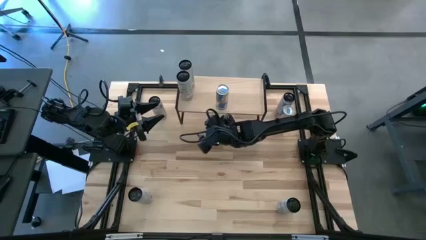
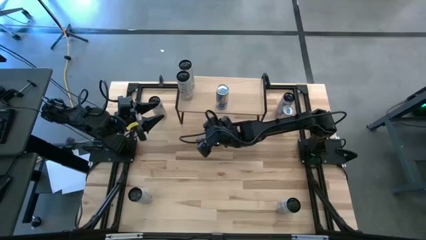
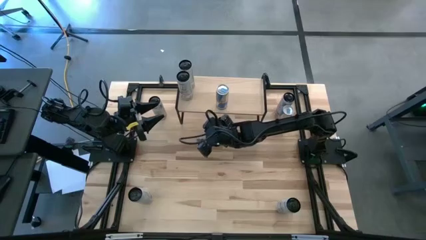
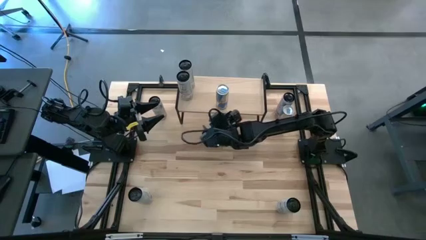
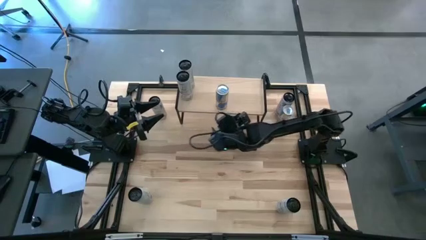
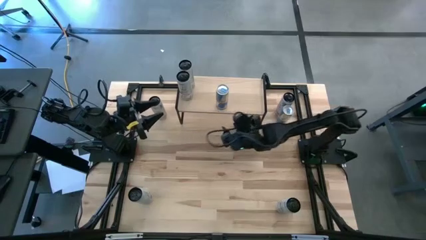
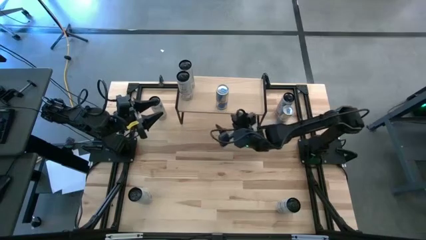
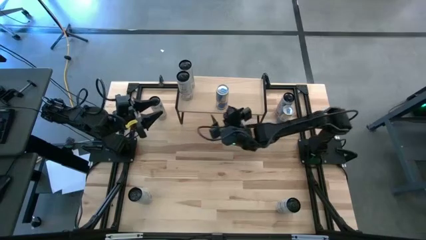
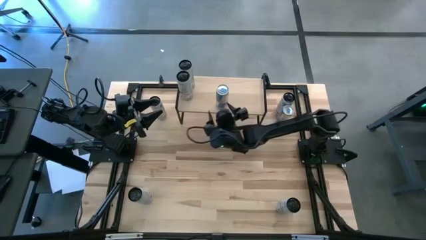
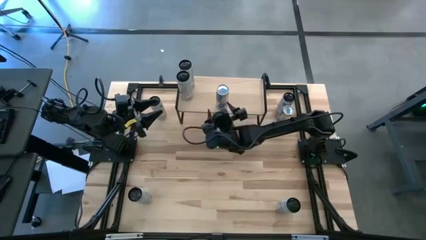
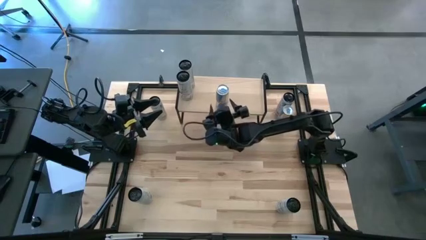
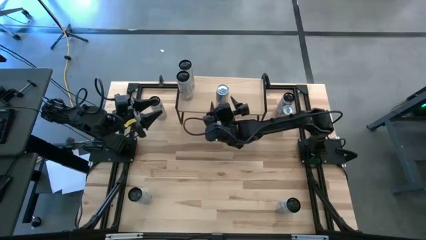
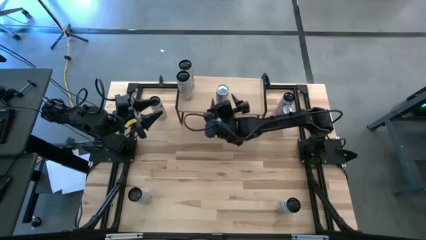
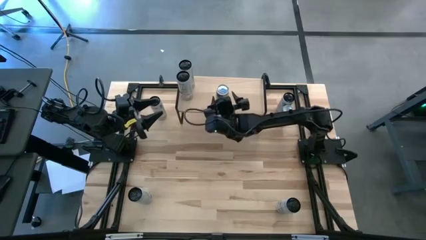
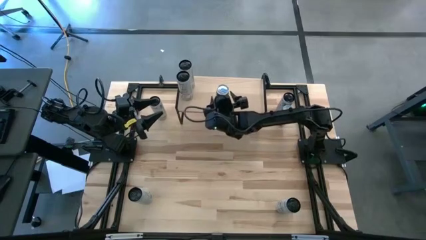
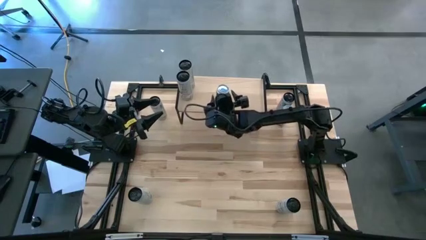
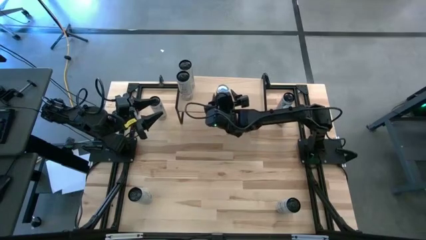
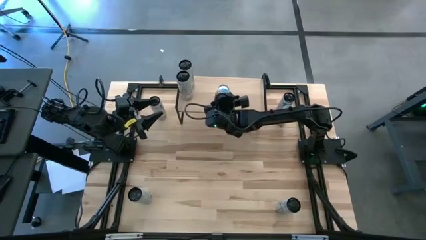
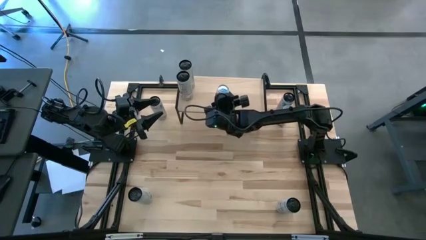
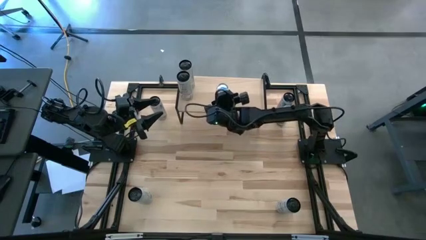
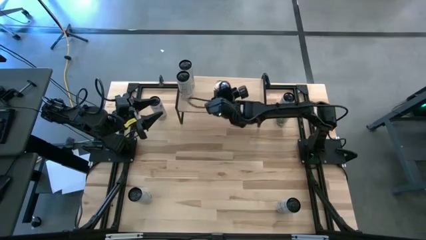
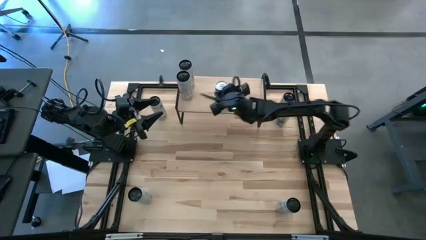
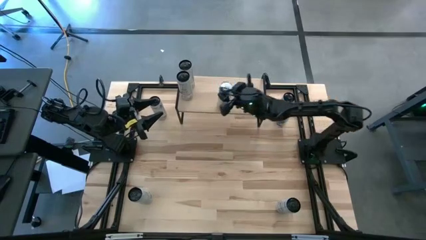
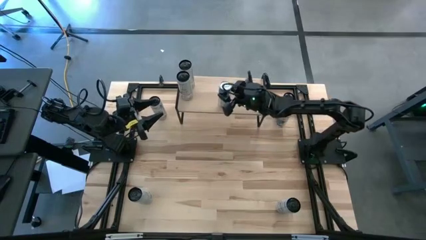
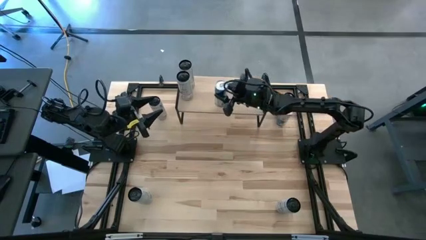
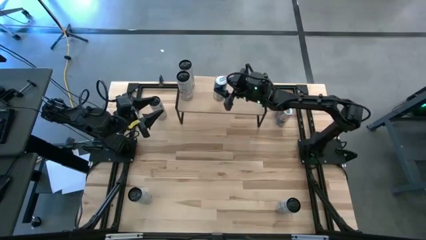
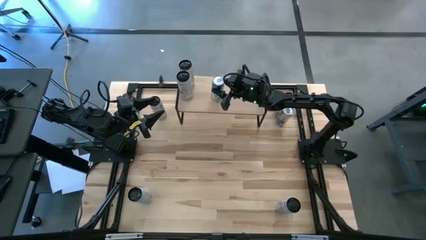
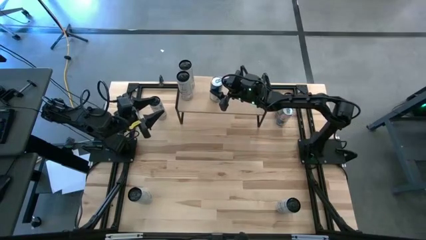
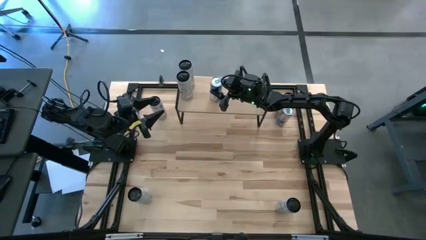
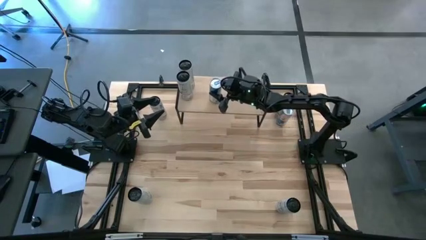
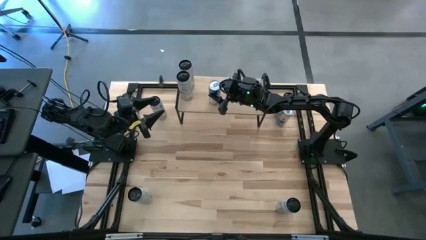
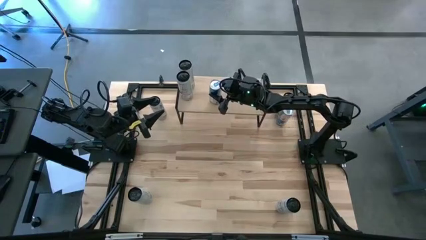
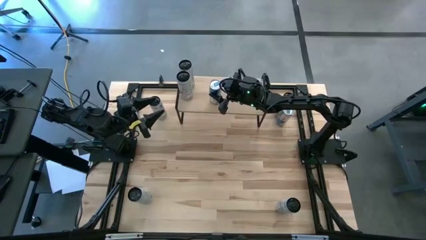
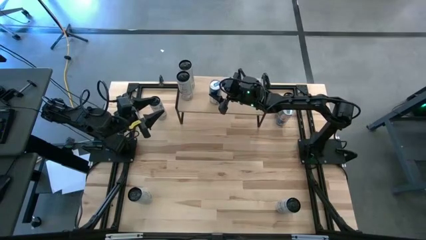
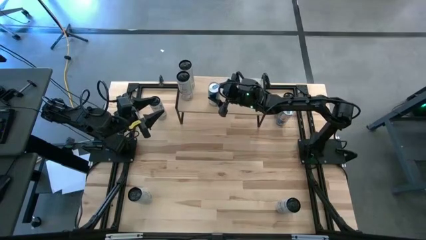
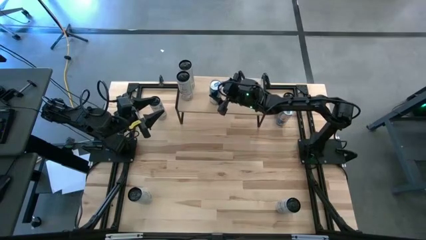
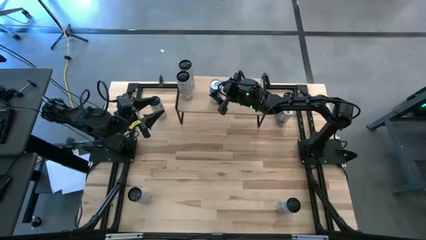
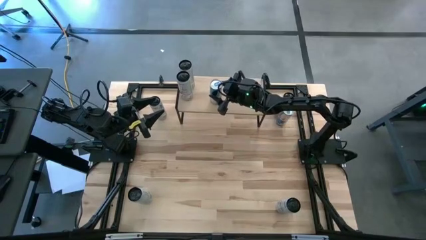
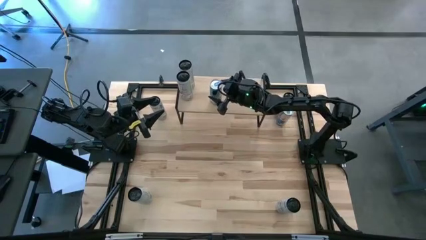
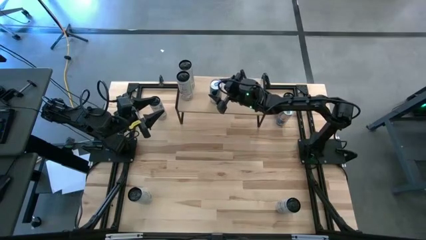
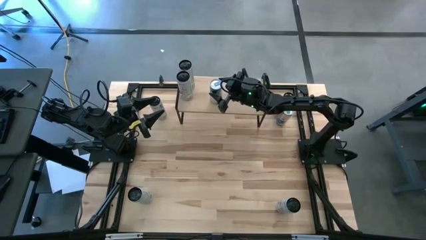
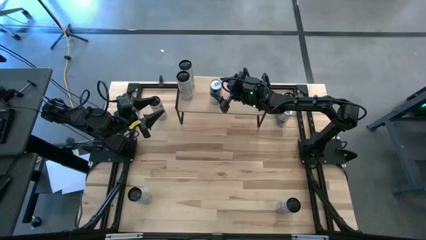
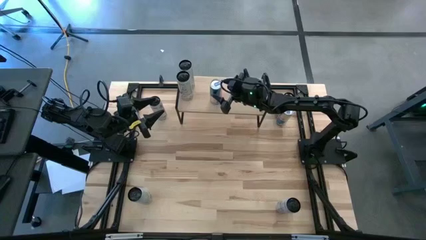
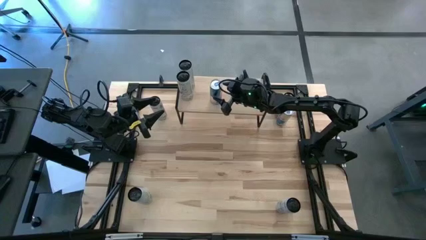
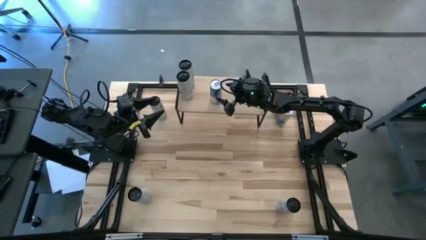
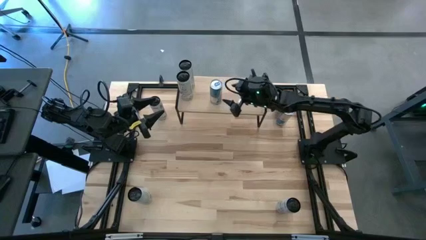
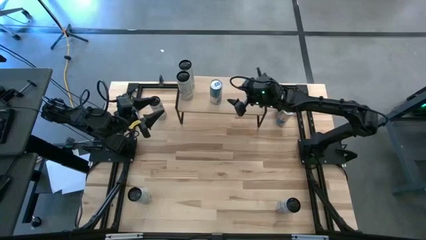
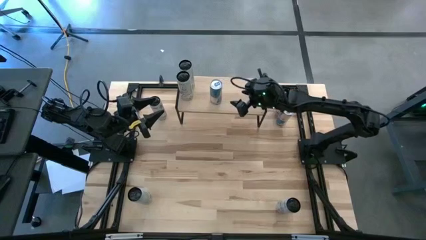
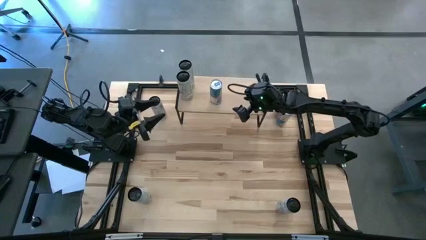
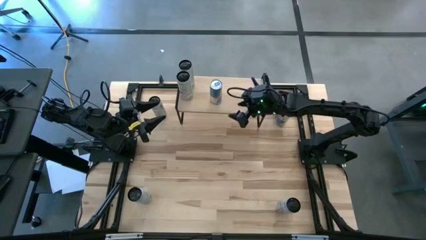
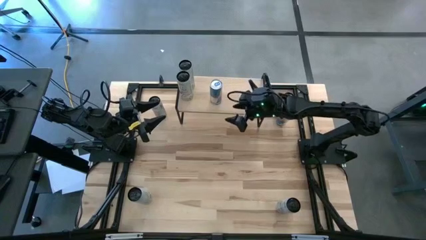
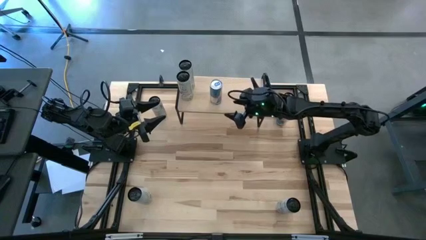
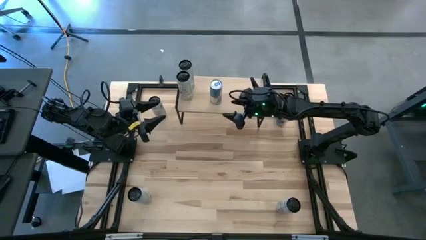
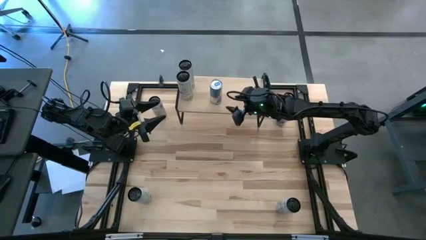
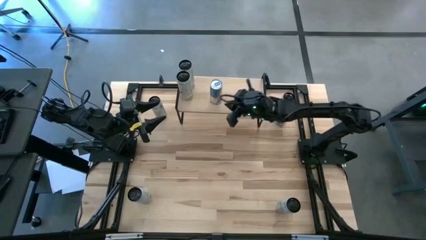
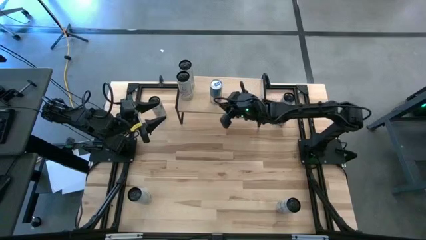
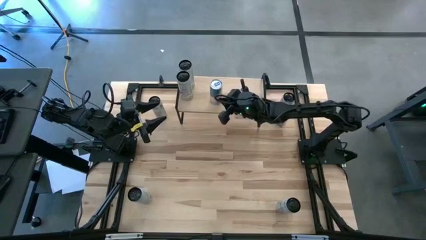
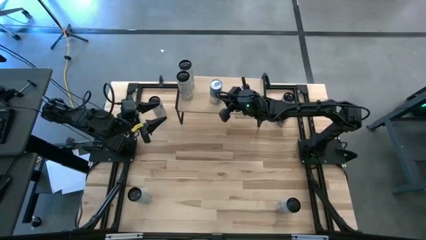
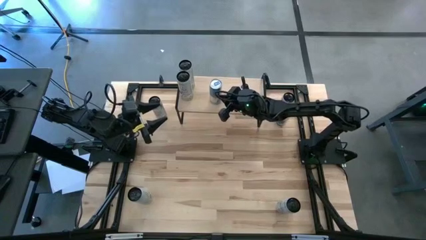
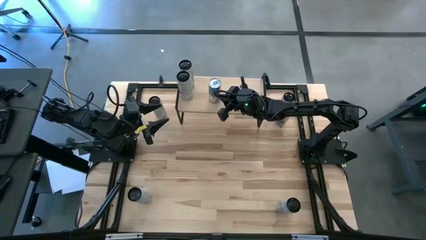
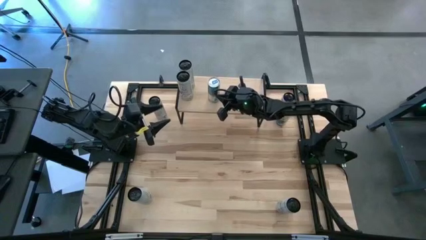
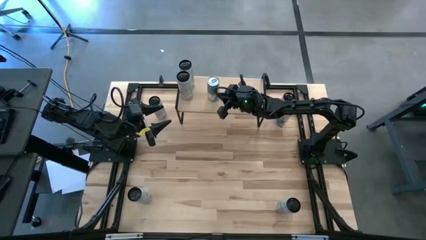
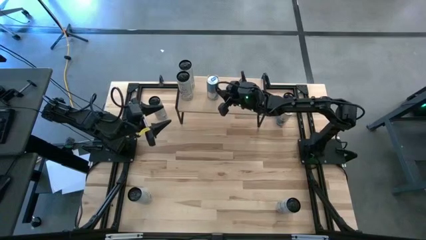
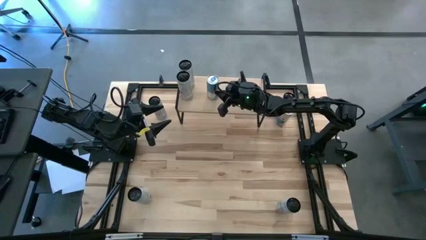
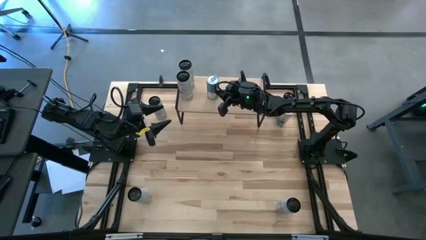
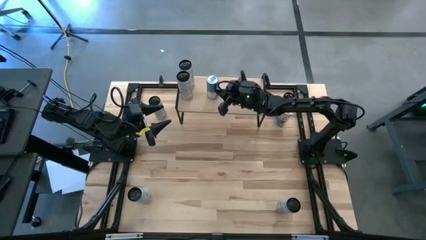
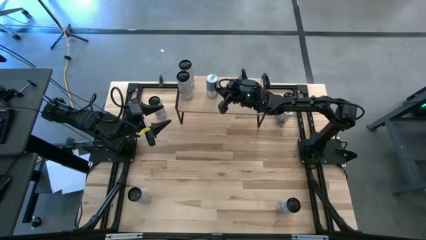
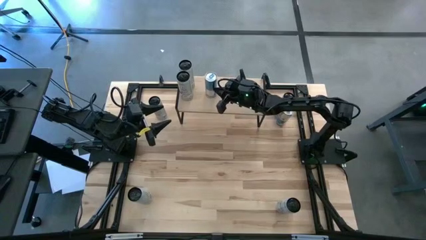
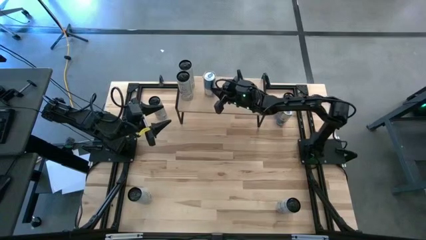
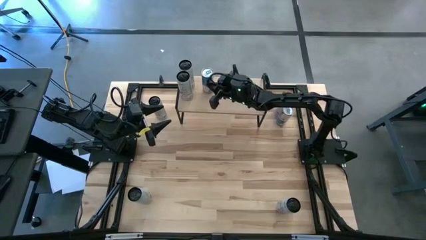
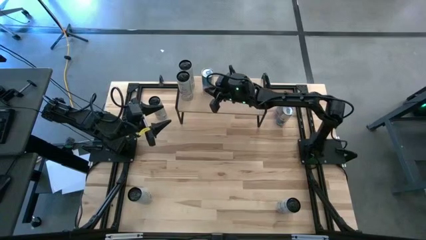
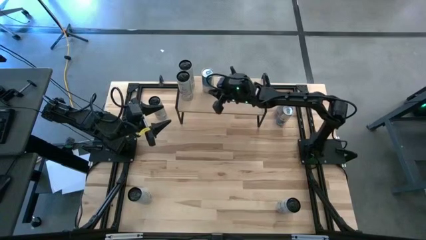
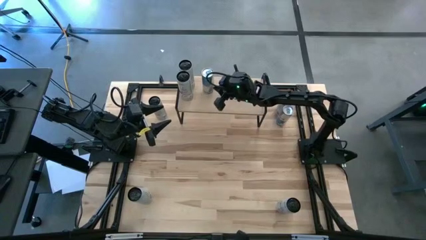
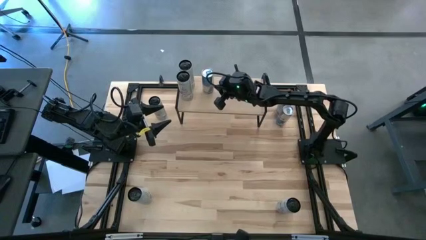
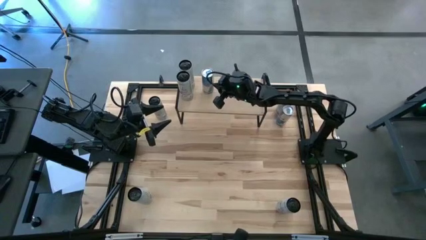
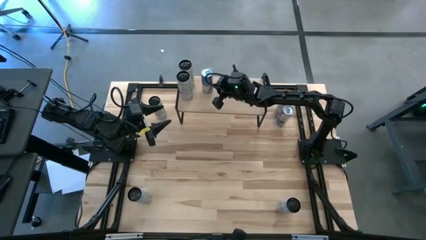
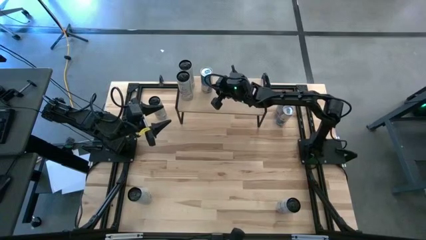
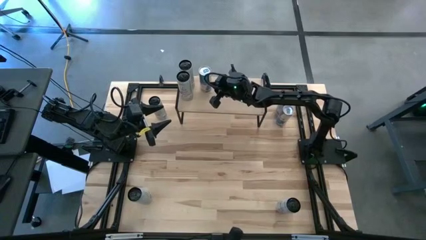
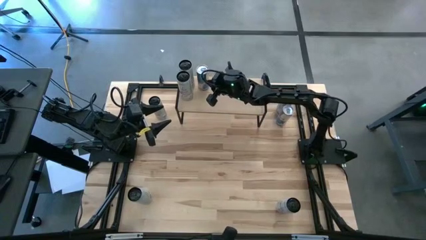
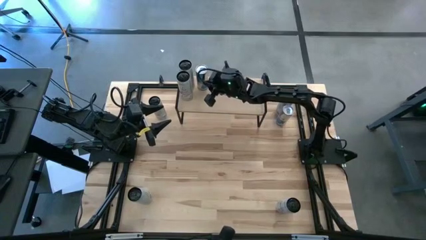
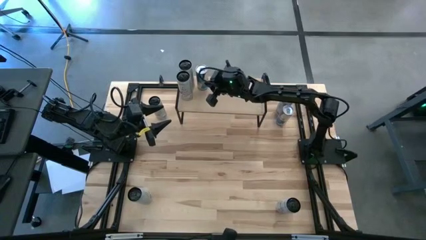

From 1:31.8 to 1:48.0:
Task: Place canned beverage on shelf
Put the left blue soda can on the shelf
